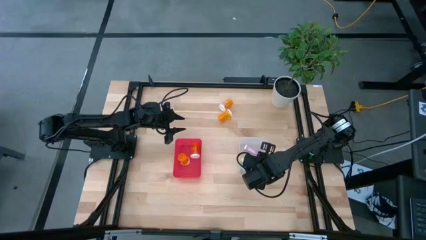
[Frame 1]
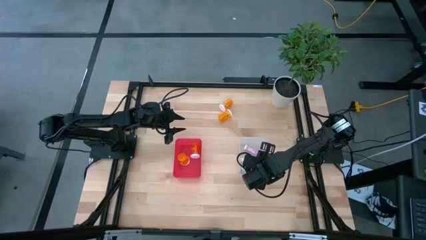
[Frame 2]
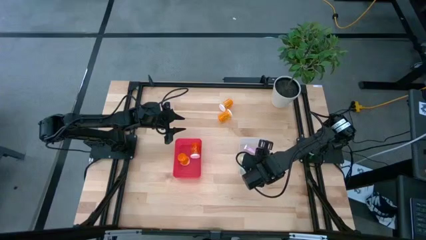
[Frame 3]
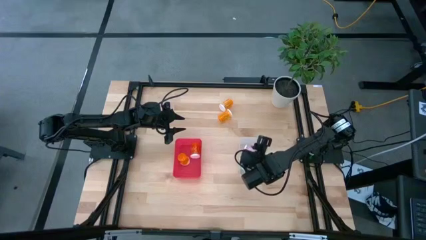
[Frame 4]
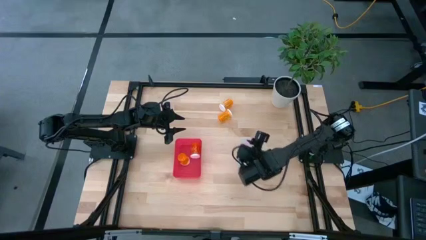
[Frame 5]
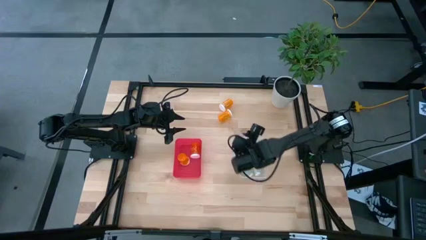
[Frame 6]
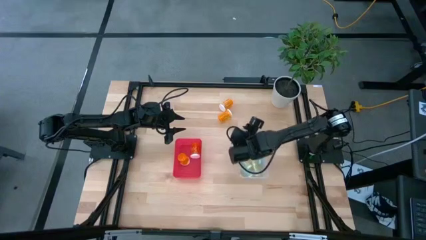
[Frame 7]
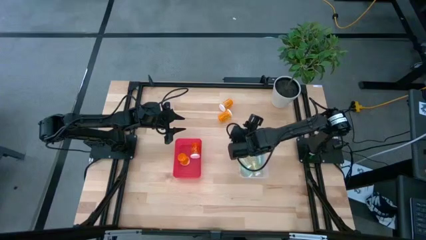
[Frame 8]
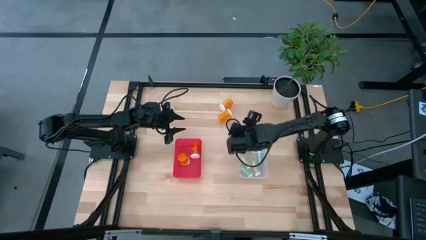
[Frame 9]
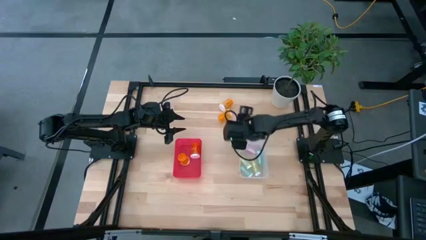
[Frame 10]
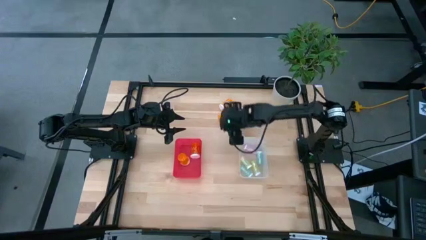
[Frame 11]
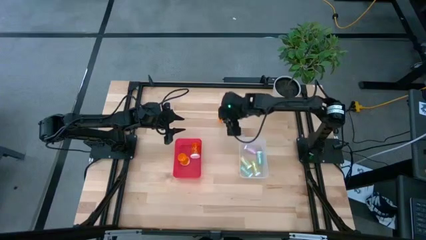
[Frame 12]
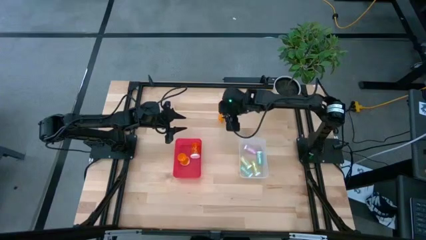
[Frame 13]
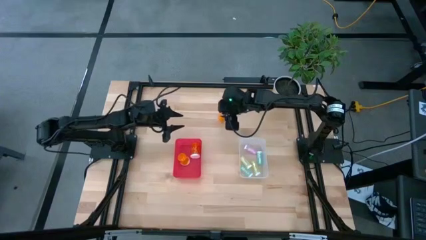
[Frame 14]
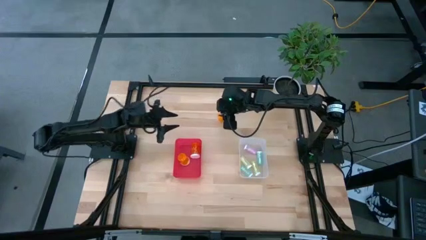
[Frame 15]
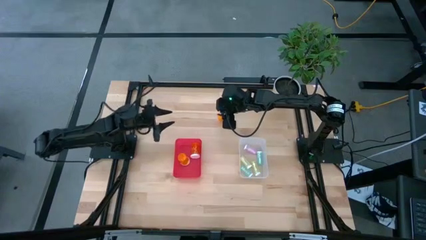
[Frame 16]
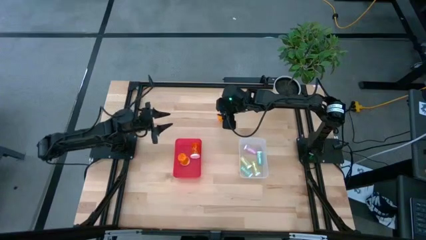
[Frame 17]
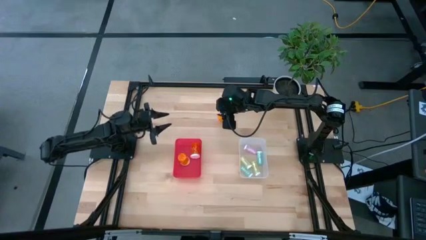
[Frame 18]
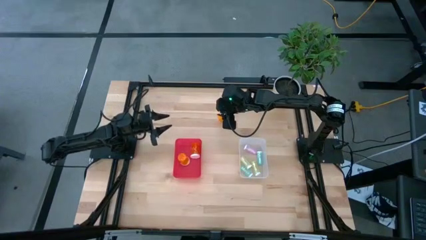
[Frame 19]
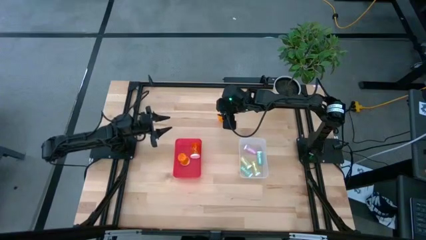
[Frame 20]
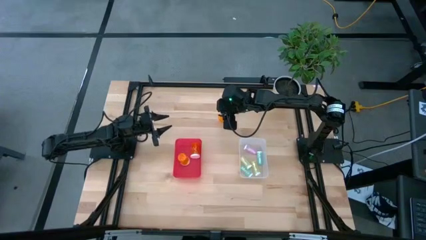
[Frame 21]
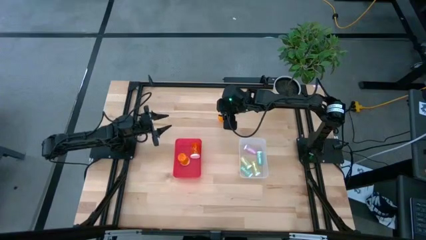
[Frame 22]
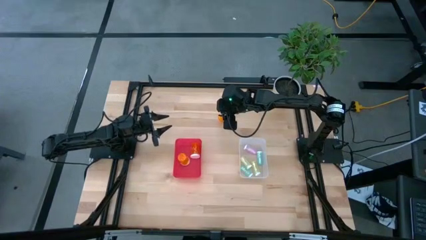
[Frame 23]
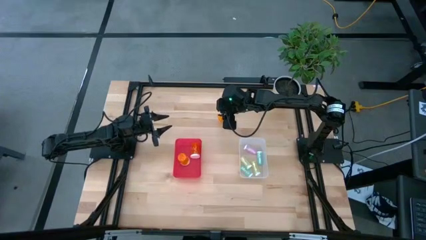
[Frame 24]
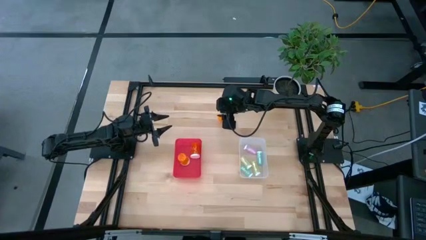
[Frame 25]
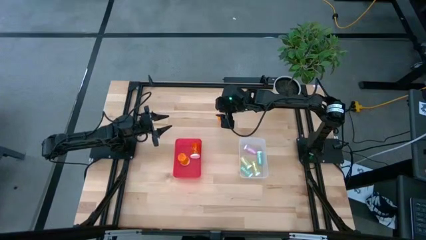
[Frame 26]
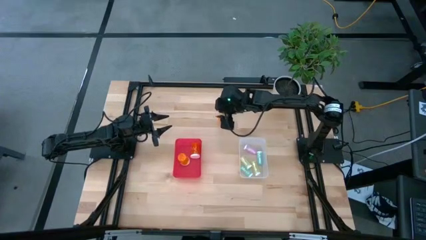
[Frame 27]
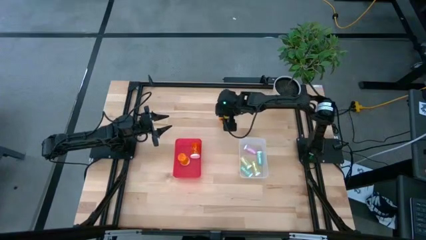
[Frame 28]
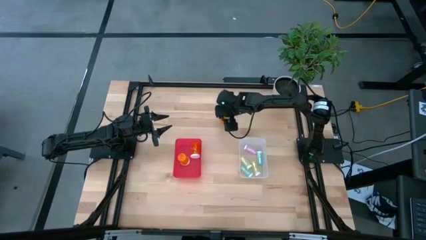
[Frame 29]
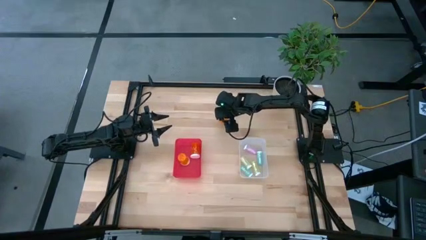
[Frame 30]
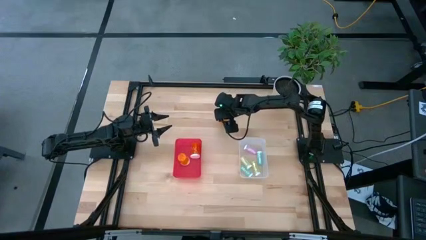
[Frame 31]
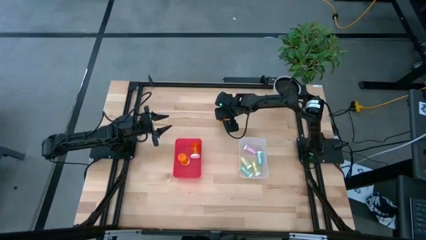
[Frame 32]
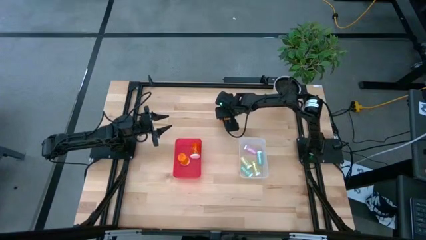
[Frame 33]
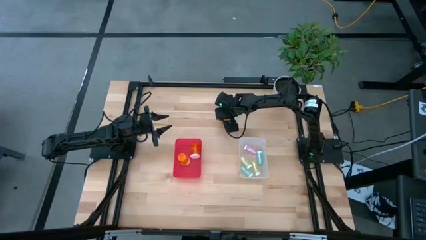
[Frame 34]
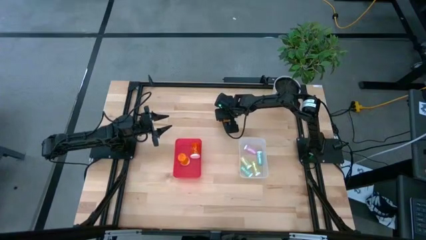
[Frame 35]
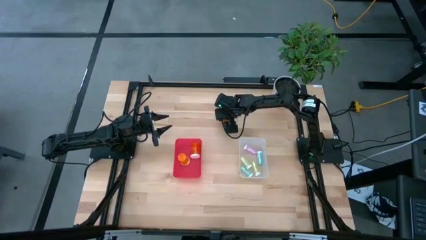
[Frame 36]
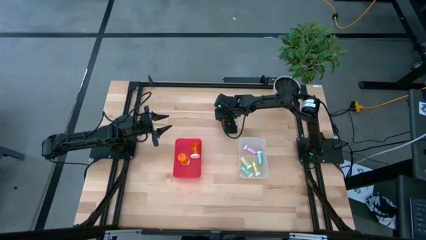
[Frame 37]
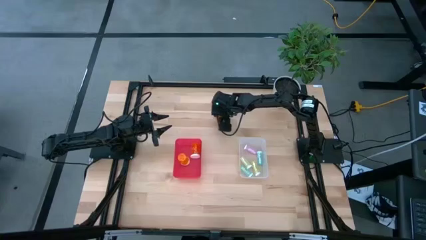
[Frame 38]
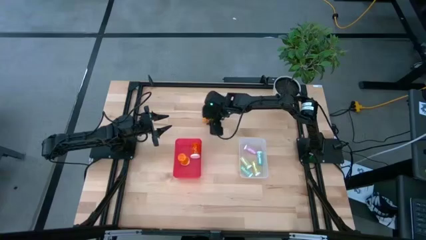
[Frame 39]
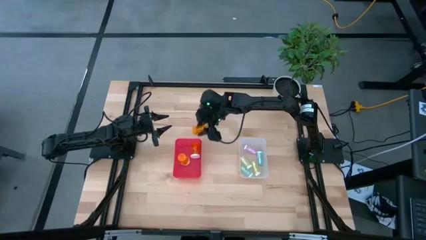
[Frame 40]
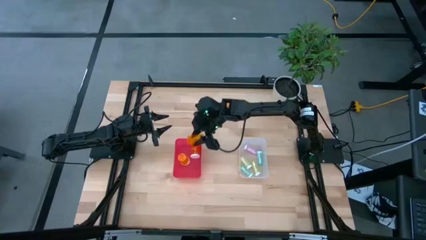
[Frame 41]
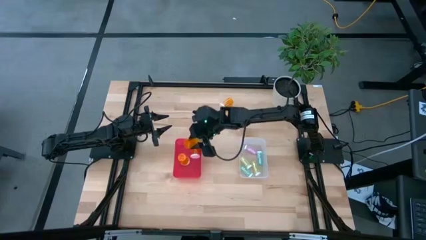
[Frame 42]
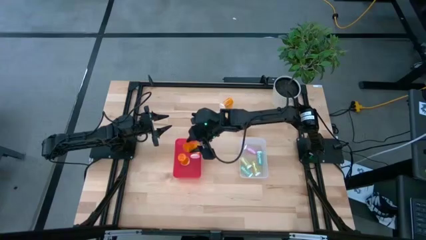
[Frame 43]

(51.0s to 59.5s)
Task: Pick and place medicine bottles into bin by pill shape (circle, oval)
Put the large orange pill bottle into the red bin

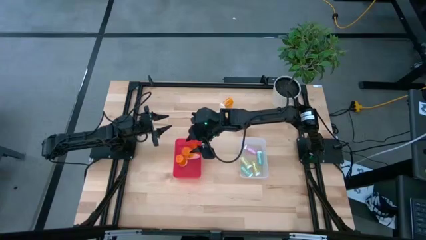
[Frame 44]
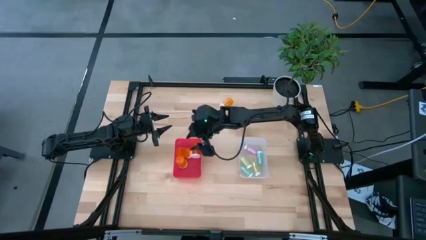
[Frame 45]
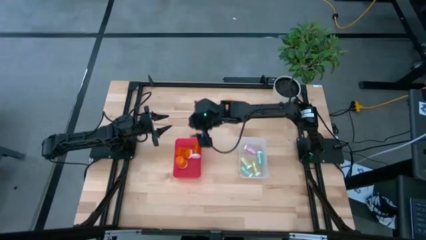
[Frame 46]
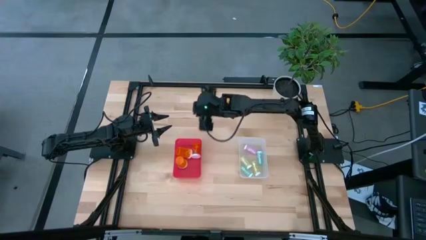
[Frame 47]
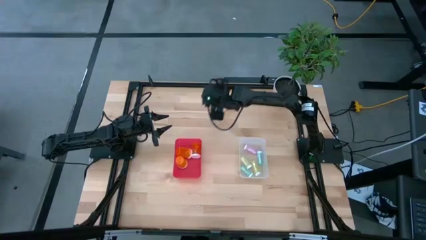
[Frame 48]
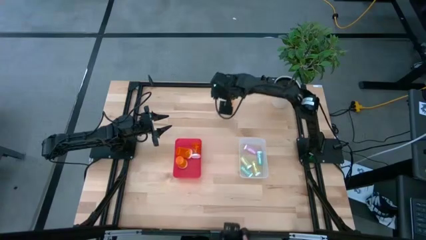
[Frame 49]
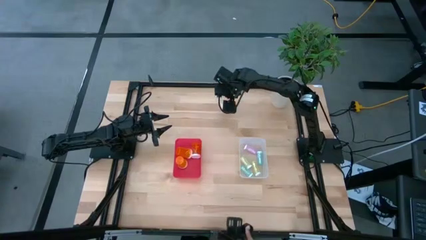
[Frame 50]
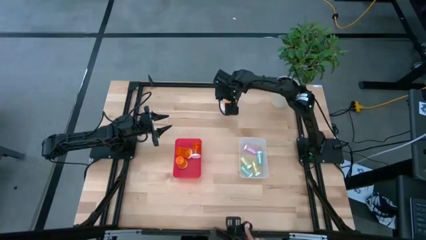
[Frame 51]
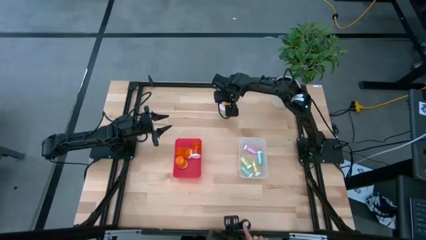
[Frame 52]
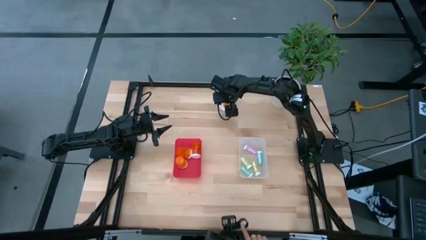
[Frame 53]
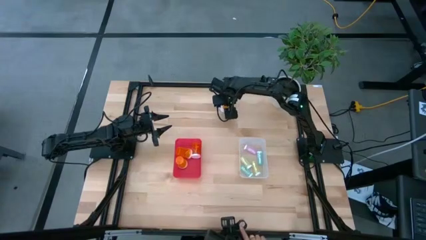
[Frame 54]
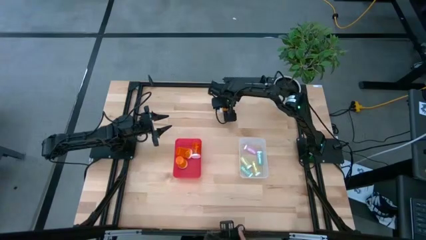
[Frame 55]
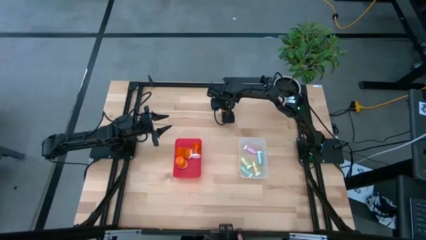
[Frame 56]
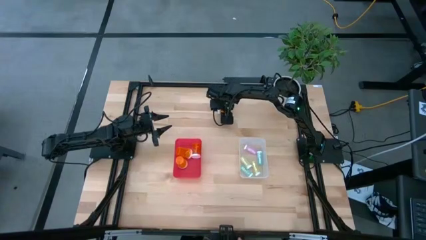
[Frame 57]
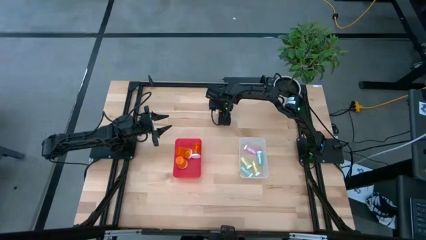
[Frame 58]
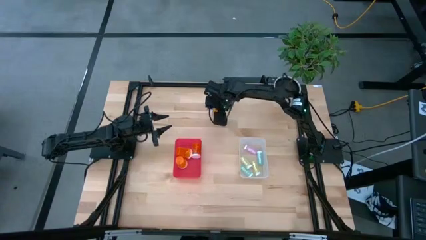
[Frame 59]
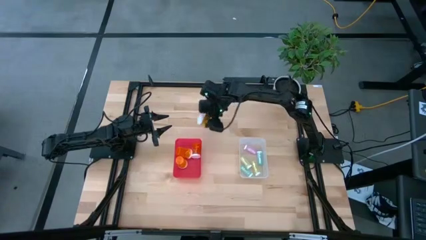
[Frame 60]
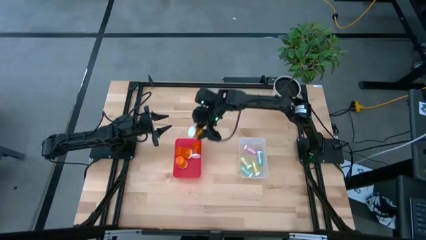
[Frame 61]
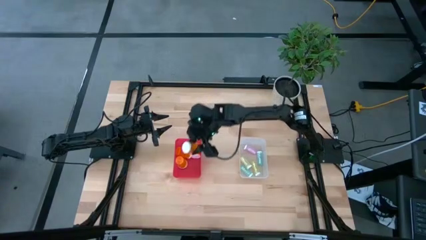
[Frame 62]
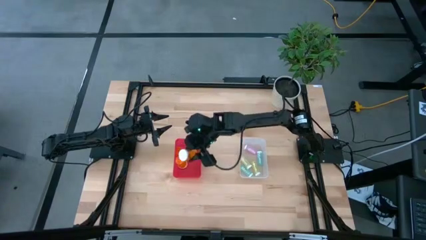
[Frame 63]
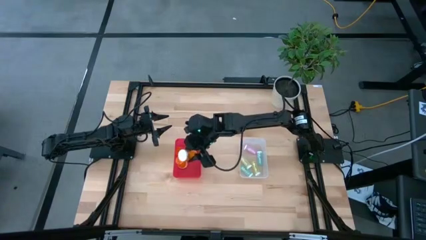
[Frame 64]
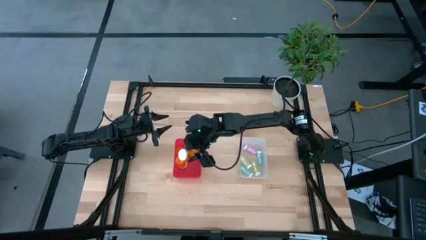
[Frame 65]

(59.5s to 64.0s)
Put the large orange pill bottle into the red bin

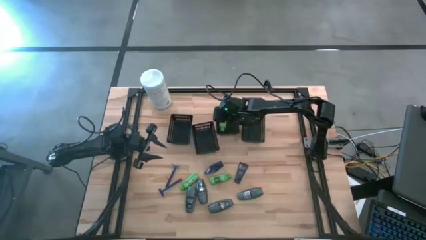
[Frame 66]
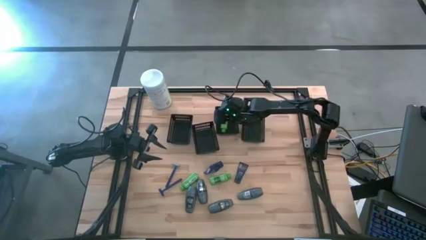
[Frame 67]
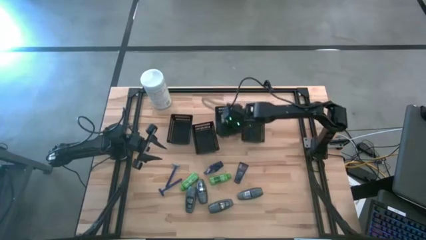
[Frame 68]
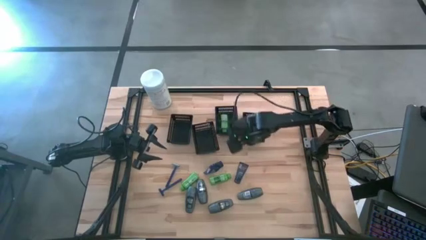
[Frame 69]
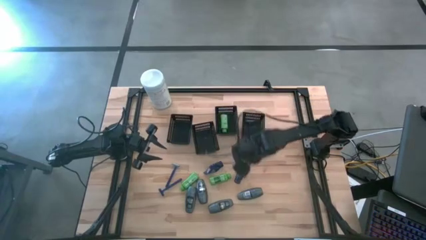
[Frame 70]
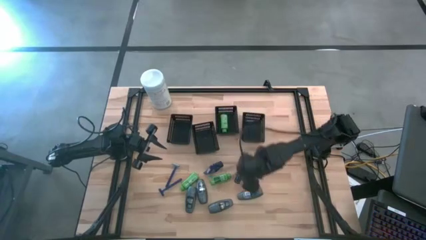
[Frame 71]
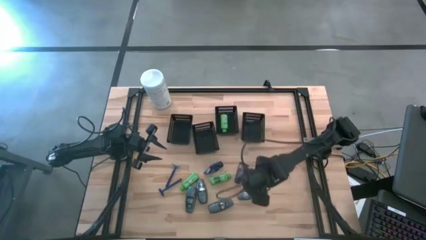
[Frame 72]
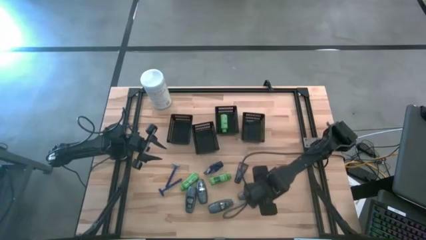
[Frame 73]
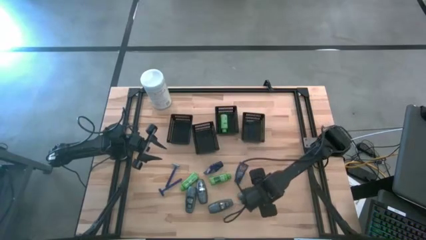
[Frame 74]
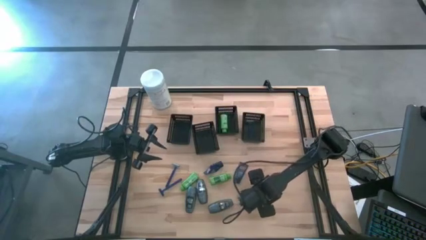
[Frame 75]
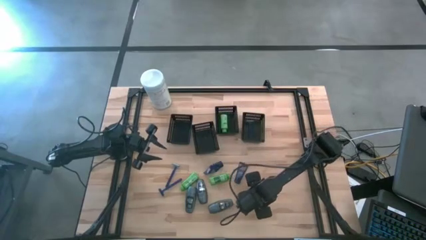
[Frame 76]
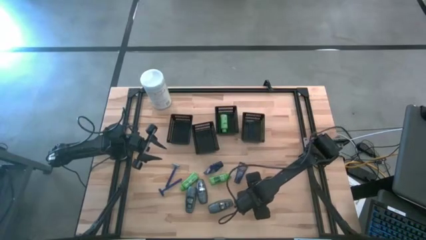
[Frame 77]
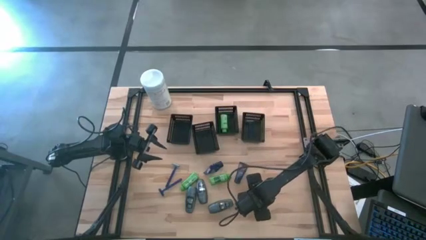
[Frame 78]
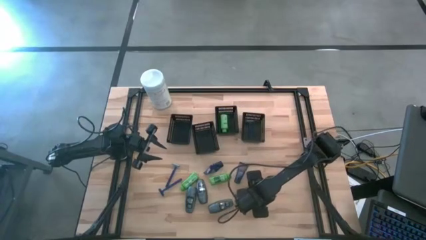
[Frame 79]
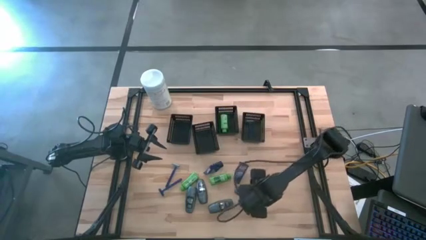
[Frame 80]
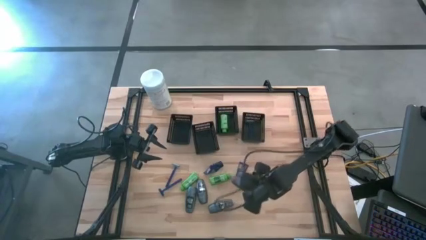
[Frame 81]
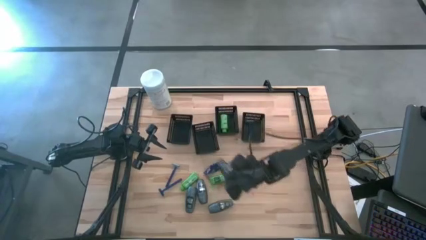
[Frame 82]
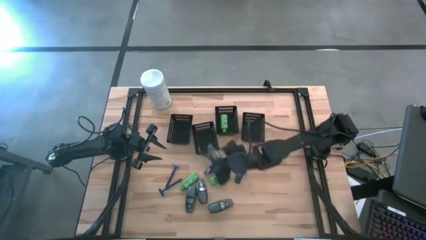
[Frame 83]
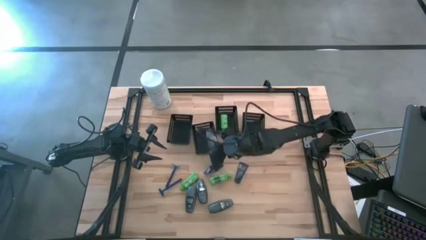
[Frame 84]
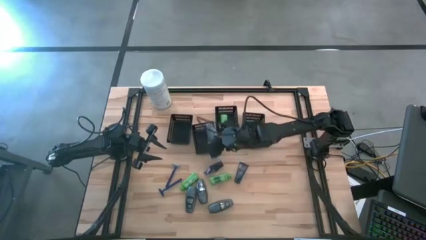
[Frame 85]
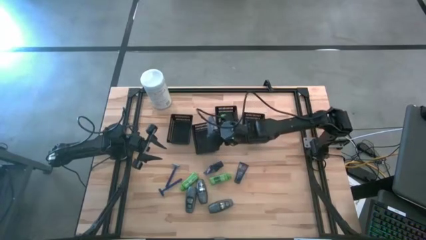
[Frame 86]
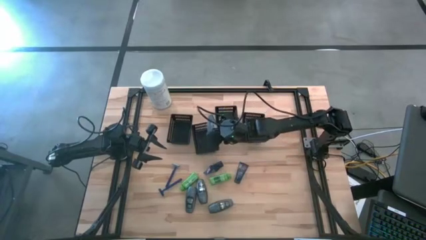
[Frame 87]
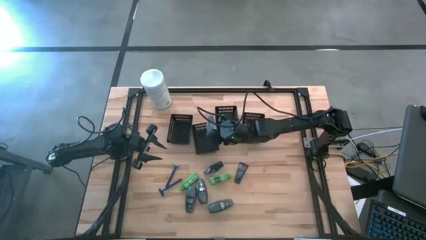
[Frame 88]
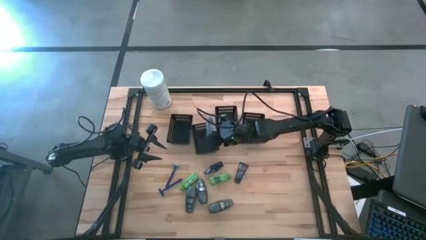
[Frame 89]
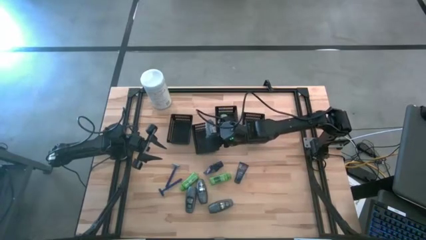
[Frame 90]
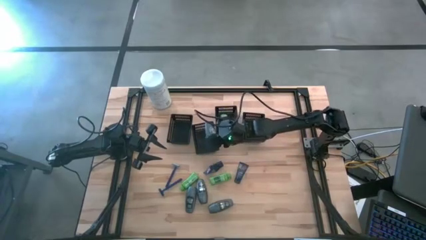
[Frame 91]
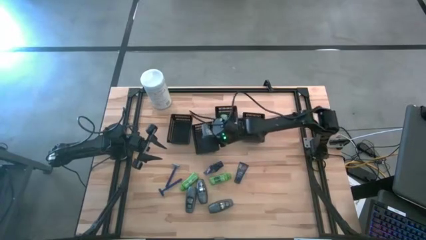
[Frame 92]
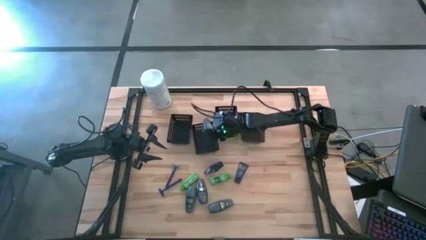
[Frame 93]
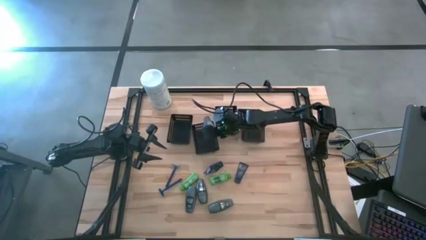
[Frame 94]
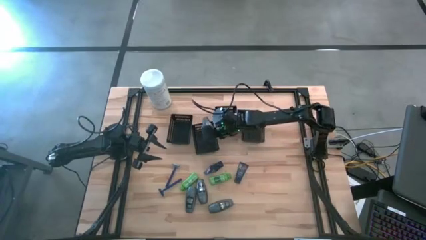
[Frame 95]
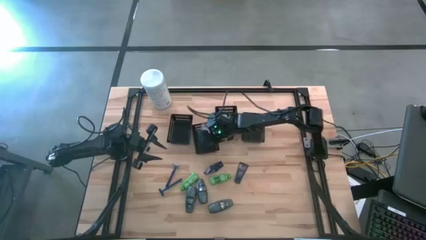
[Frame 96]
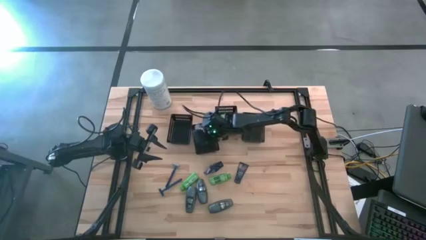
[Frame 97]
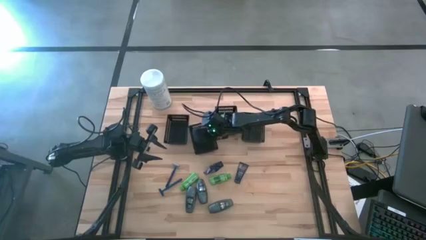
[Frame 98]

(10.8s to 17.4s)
Task: Pick & Place Travel size toiletries
Put the deodorant into the middle left bin
